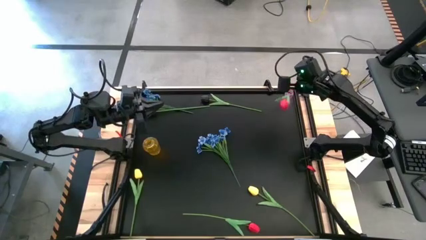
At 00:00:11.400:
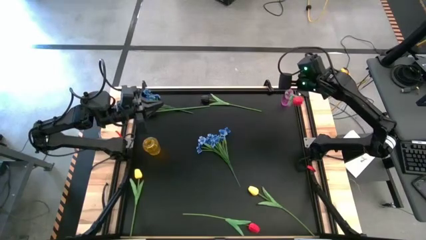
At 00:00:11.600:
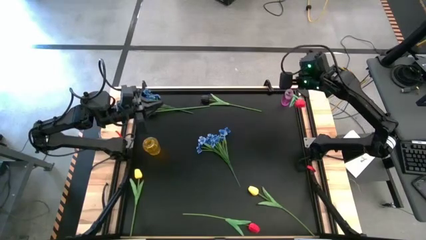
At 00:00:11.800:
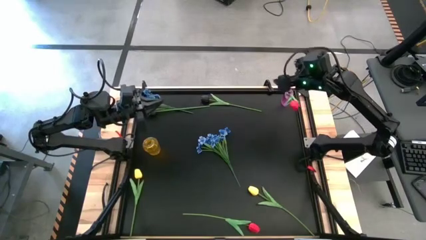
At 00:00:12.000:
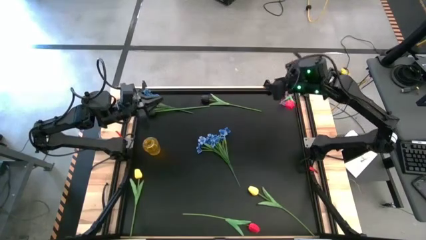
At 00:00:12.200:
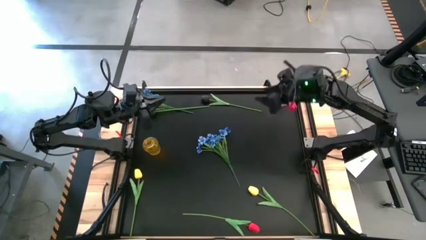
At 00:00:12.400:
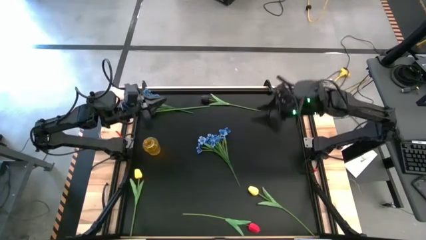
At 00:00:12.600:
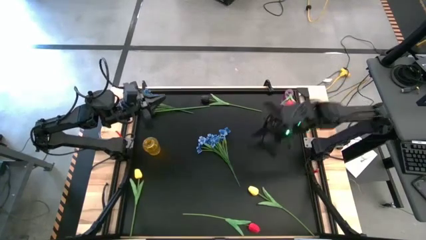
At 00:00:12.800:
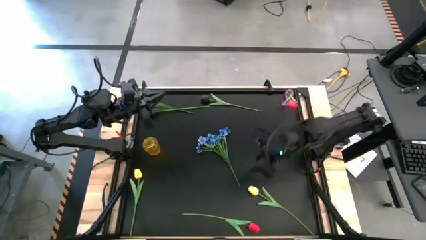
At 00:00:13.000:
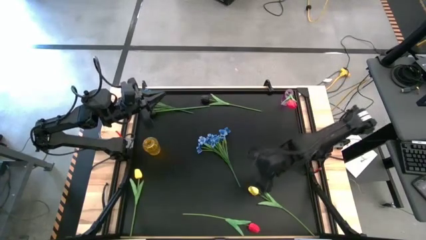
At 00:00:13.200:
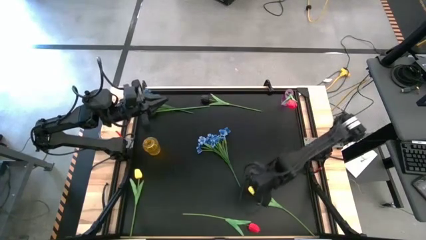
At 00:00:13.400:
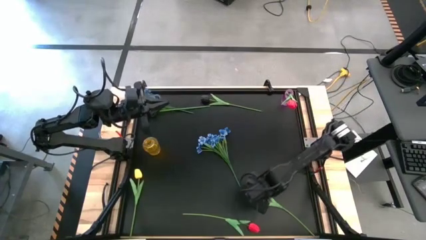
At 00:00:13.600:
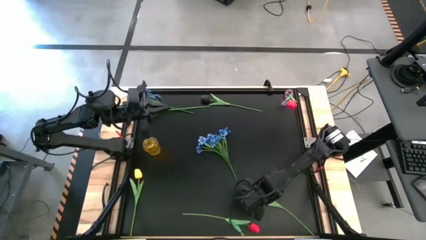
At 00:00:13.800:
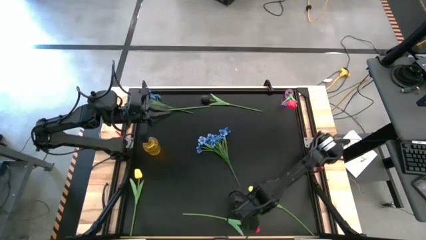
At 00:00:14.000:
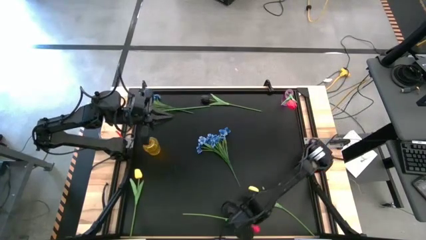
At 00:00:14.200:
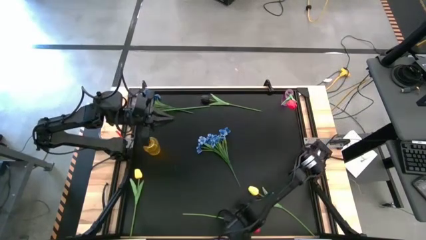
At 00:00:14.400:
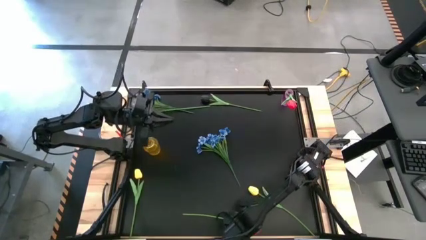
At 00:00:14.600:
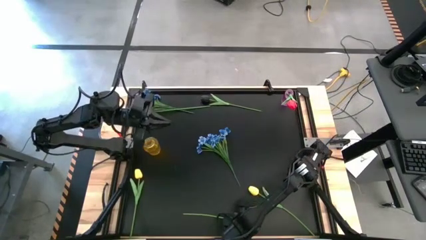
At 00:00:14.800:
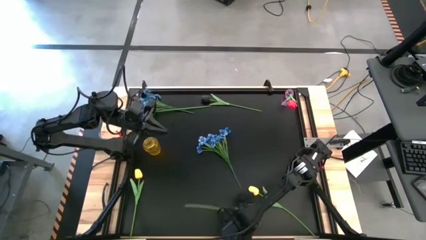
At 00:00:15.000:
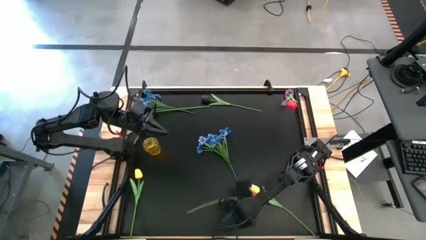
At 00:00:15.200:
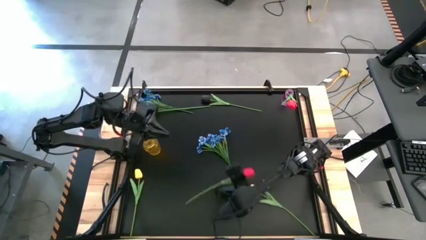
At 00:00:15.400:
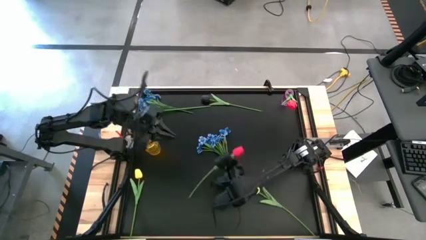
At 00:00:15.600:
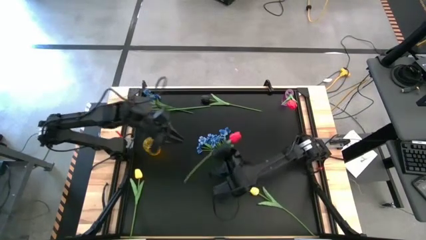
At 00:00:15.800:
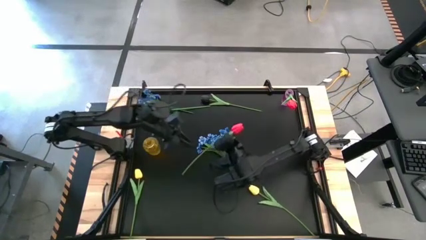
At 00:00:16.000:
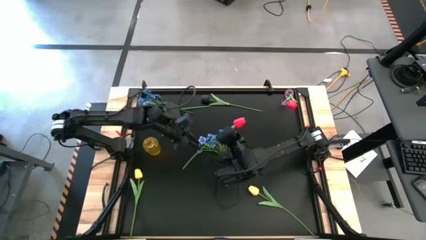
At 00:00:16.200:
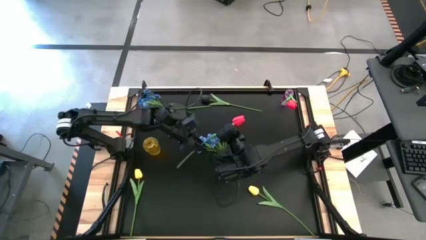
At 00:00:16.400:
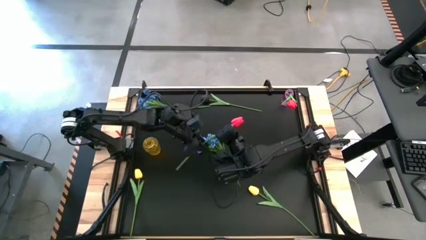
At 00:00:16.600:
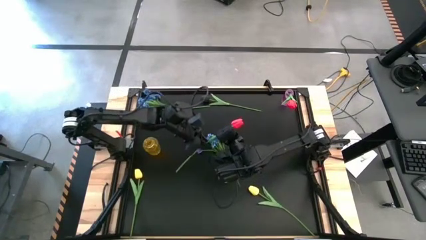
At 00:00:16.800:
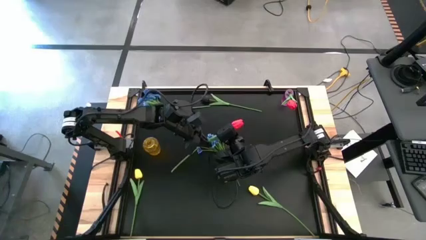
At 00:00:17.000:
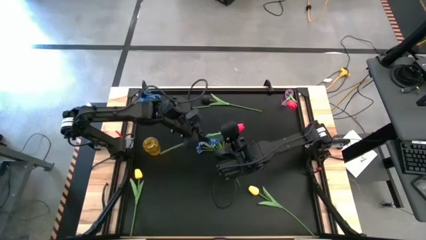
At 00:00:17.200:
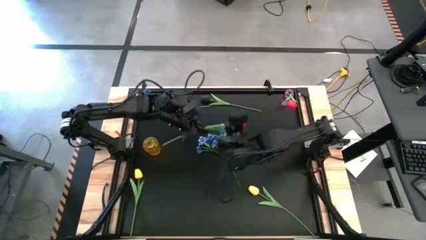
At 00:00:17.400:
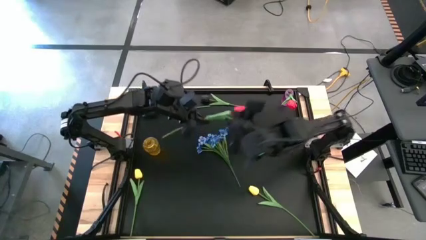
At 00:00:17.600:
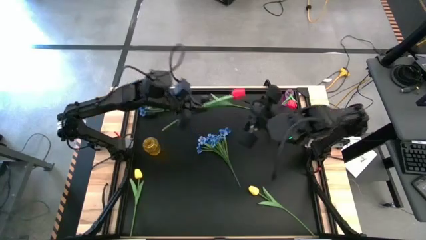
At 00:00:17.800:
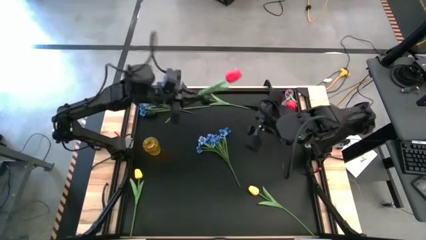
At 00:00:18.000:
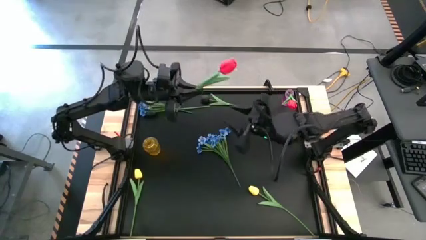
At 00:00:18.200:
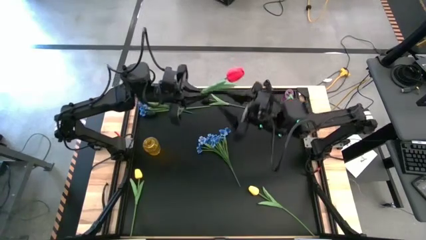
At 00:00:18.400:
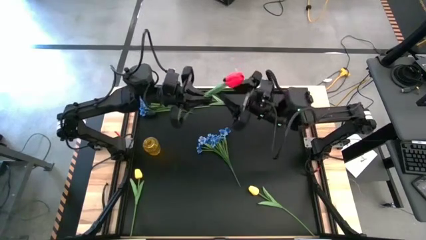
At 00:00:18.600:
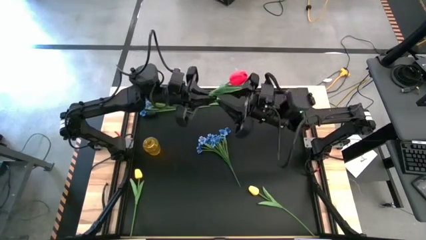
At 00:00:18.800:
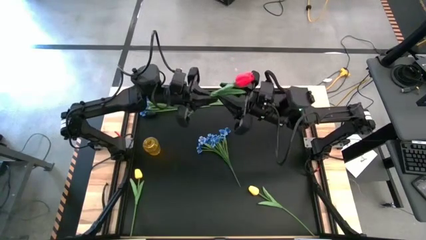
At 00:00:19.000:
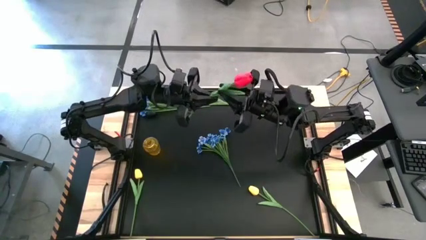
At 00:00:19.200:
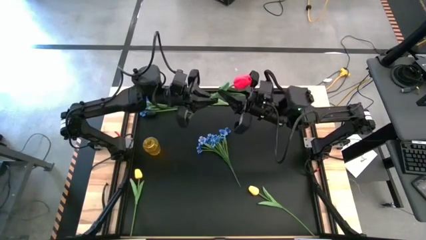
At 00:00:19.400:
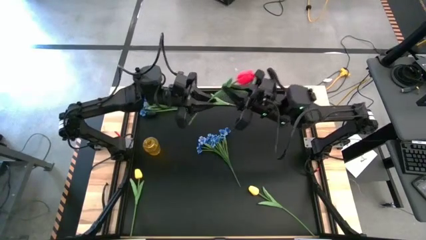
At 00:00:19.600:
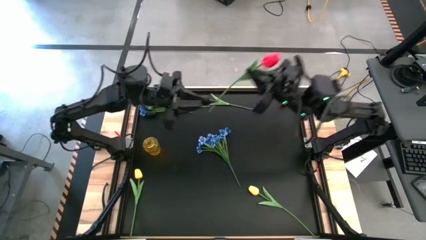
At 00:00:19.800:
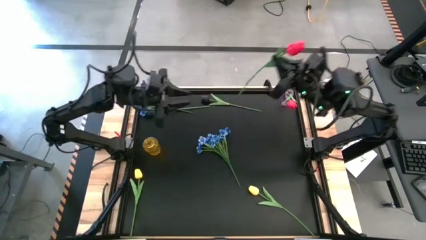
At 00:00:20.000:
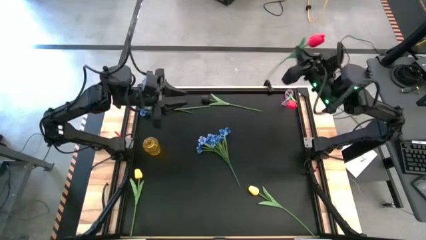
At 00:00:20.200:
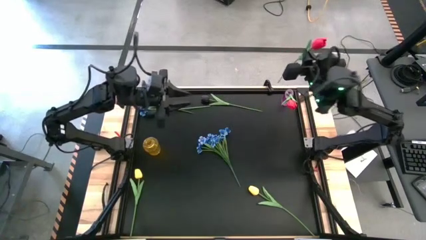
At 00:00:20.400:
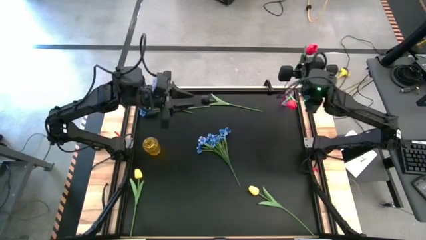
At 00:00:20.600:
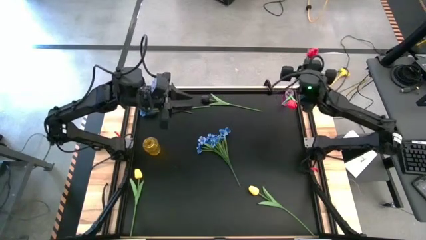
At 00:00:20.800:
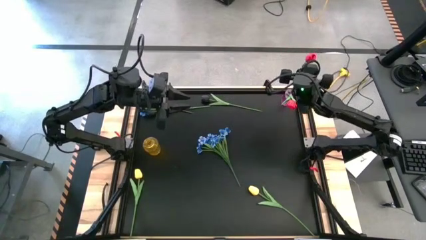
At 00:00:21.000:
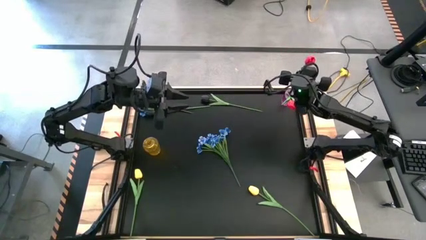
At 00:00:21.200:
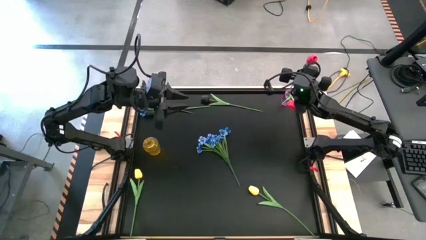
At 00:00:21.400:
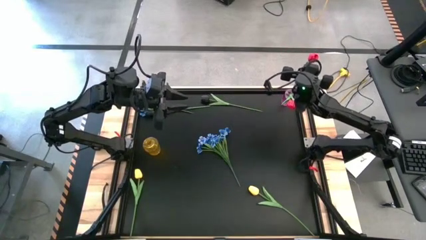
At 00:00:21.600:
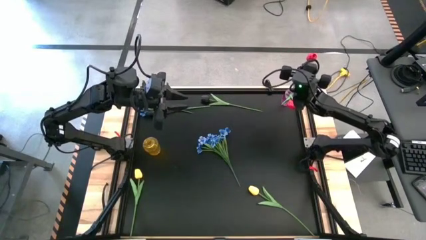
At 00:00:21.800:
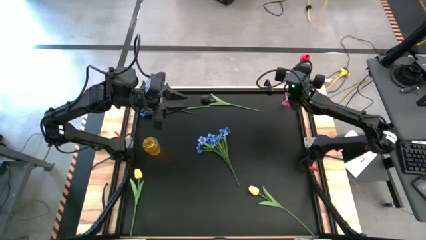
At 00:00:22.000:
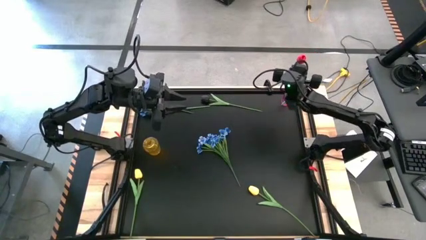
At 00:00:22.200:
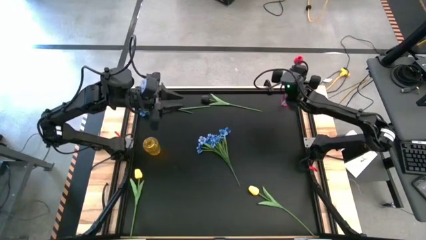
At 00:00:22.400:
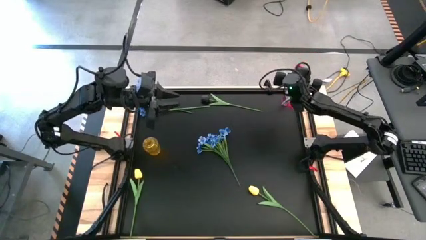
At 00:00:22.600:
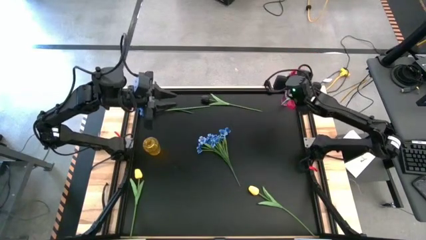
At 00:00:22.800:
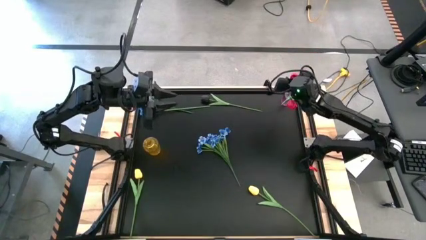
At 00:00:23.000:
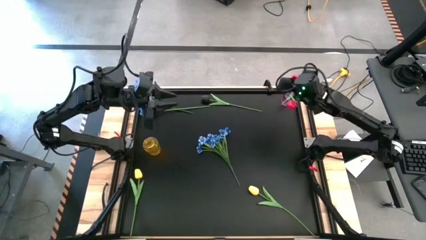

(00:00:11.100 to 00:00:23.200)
Task: Sort flowers into vase by color
Put the red flower into the purple vase

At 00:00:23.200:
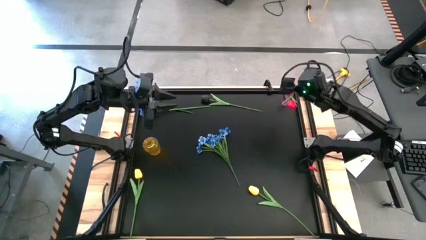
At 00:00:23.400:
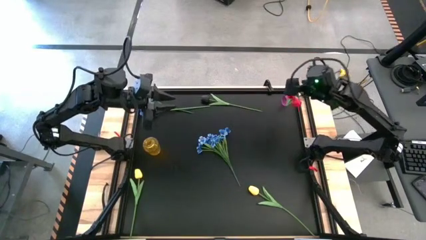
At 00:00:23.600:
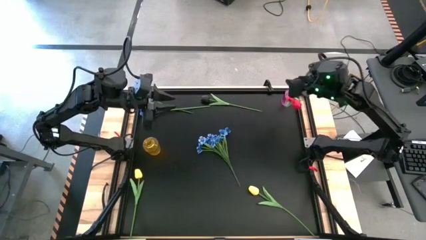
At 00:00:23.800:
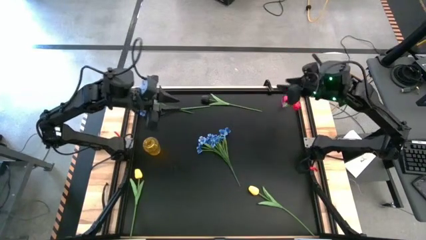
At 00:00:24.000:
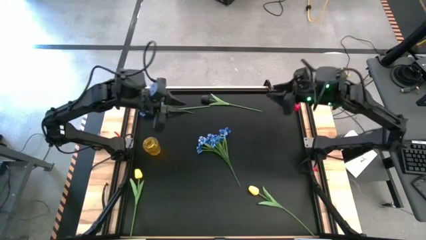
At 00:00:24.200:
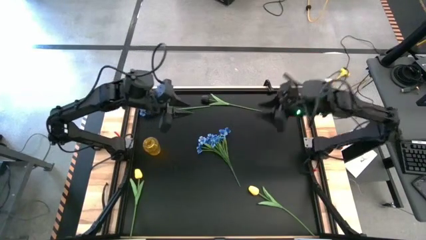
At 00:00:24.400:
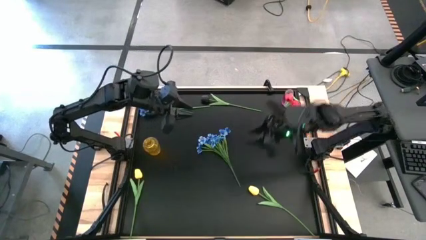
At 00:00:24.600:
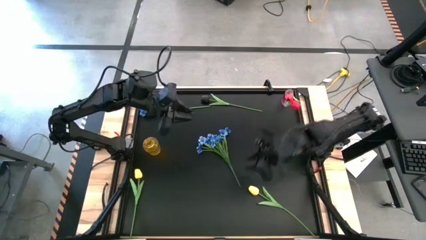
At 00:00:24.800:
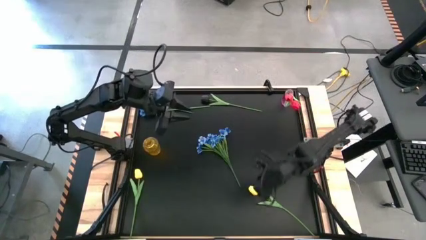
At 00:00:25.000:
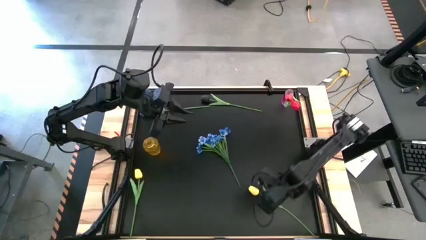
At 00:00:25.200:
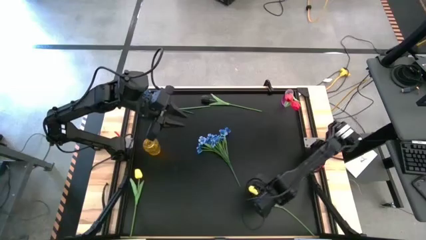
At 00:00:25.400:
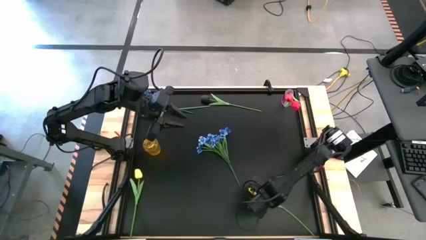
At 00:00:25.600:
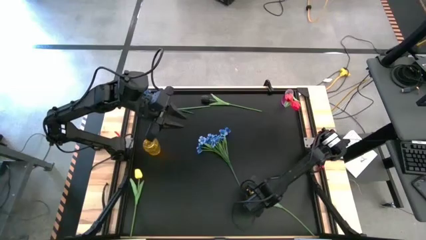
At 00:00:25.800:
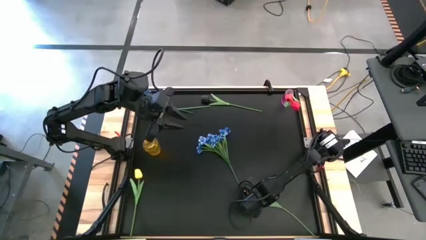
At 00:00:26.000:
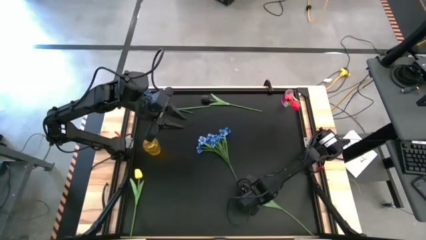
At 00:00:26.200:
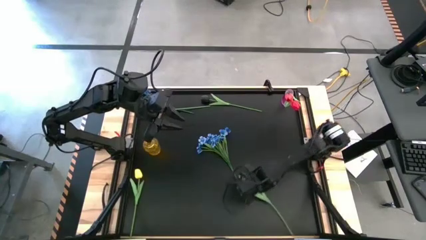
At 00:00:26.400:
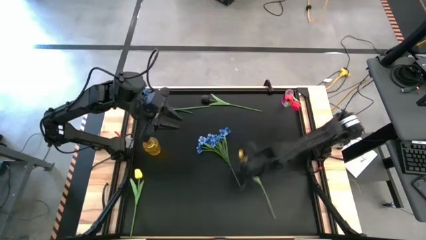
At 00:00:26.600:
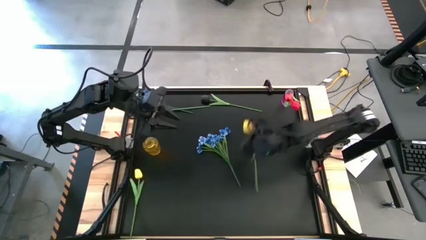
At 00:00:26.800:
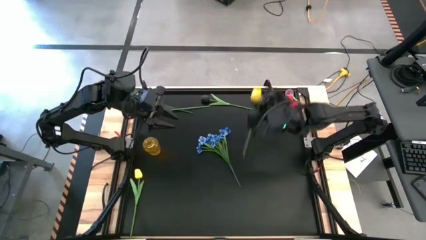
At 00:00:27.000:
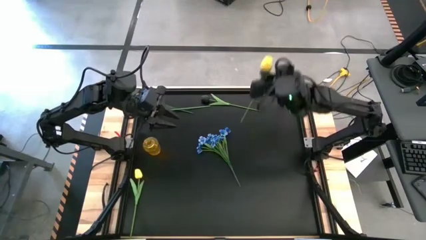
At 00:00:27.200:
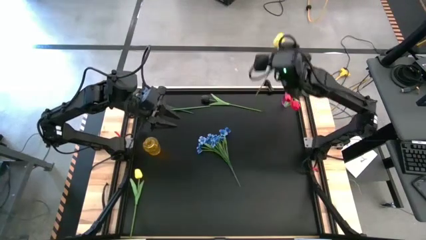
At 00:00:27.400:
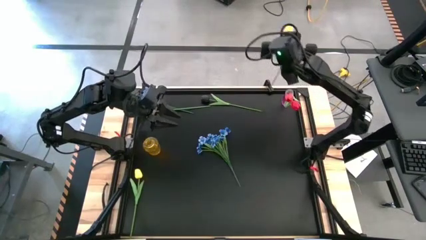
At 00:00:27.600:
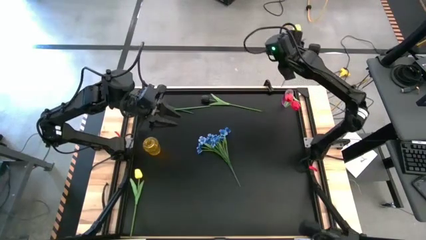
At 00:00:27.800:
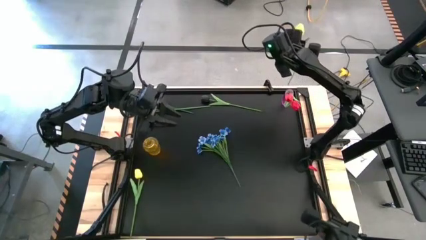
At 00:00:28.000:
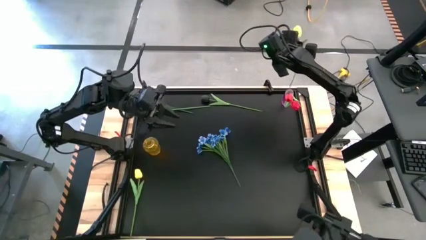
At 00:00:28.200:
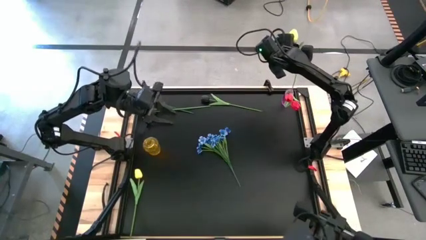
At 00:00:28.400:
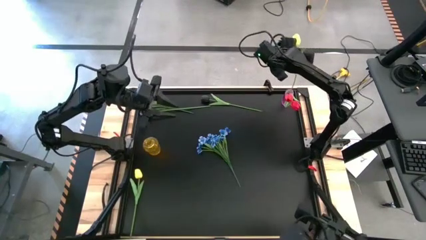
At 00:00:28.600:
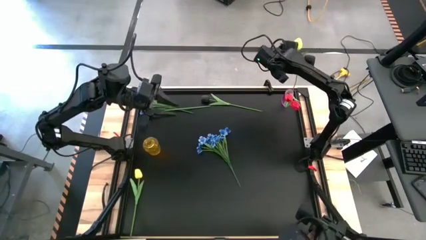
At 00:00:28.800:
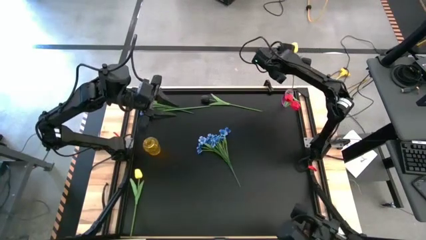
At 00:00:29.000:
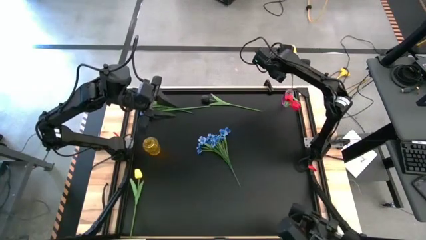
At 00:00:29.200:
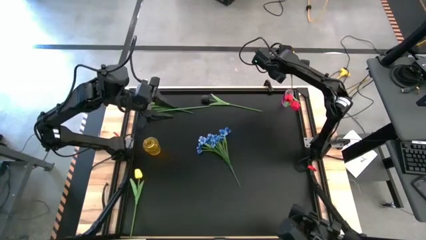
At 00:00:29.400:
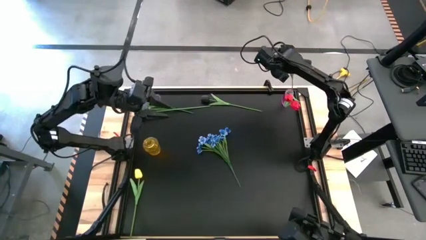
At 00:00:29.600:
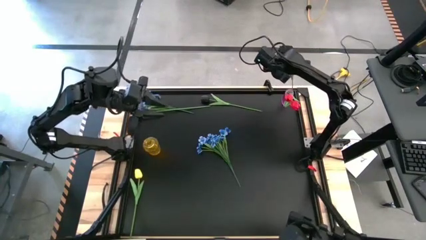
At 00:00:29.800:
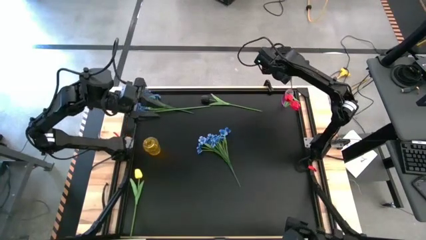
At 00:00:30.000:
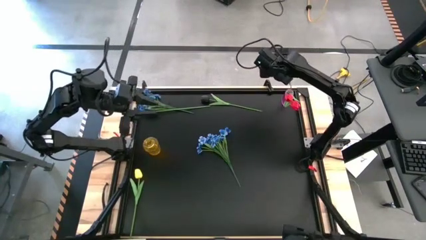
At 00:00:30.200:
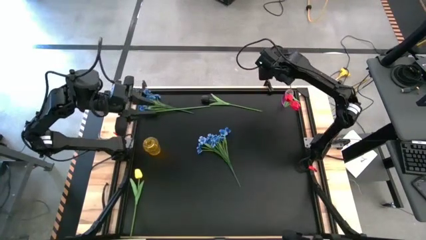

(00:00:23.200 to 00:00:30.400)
Put the right yellow flower into the purple vase
